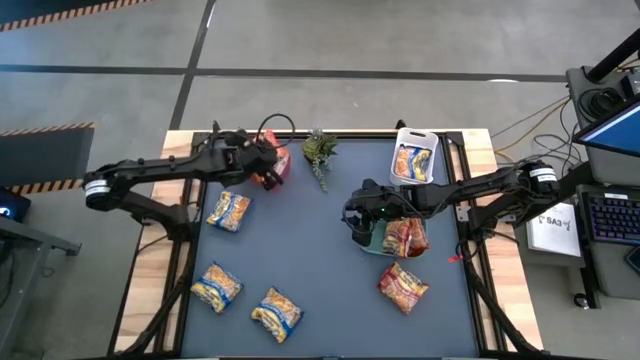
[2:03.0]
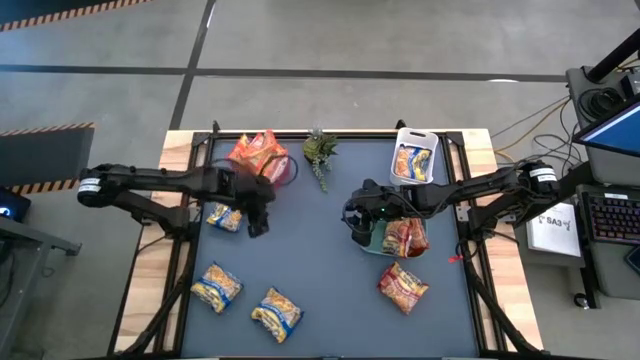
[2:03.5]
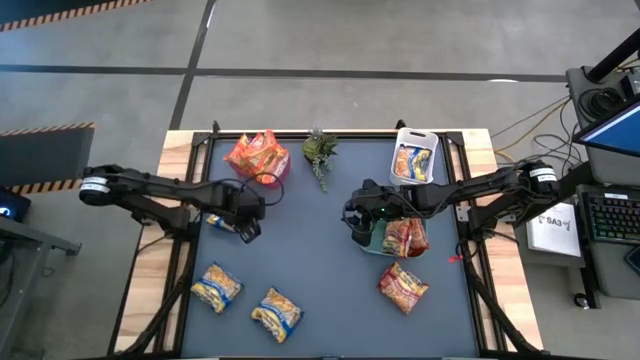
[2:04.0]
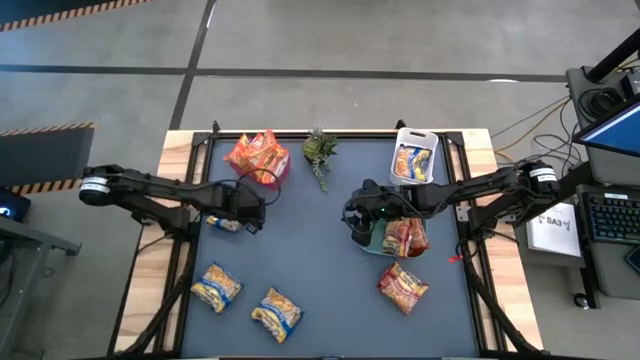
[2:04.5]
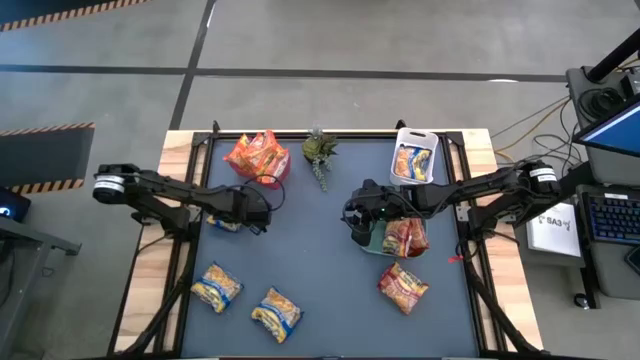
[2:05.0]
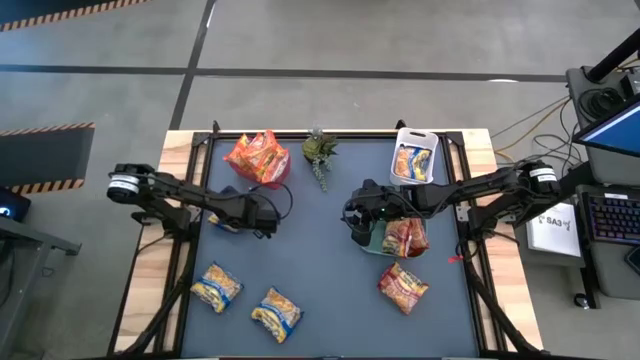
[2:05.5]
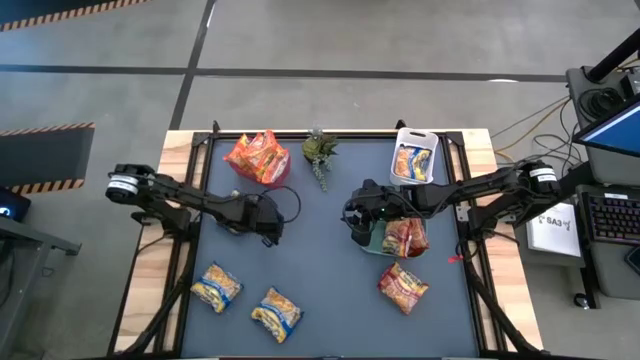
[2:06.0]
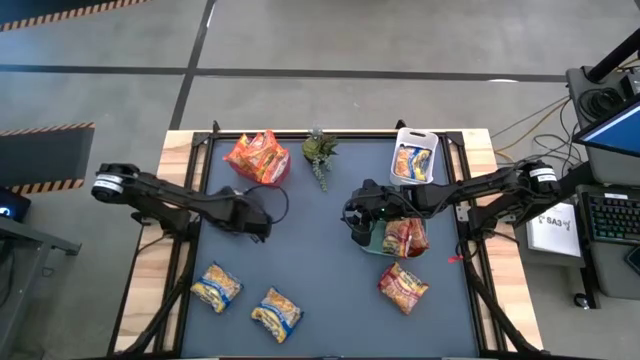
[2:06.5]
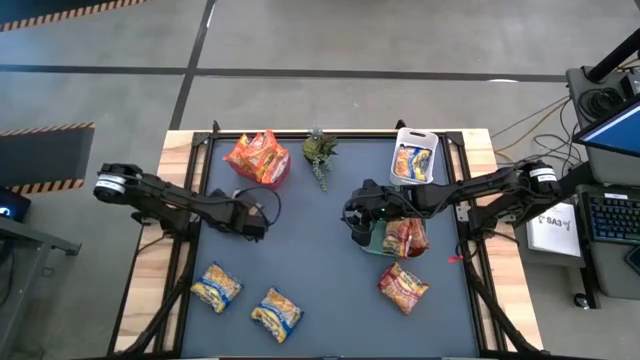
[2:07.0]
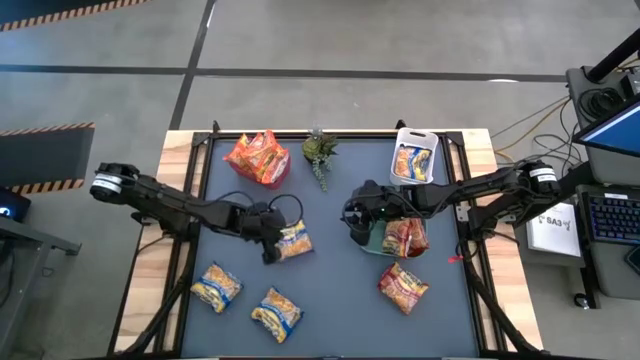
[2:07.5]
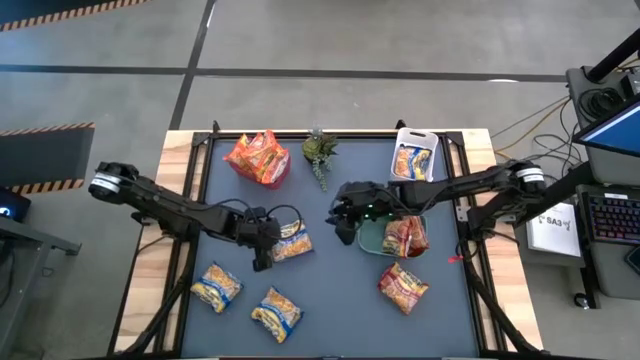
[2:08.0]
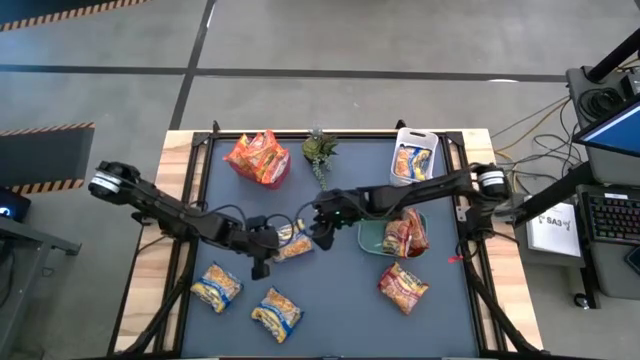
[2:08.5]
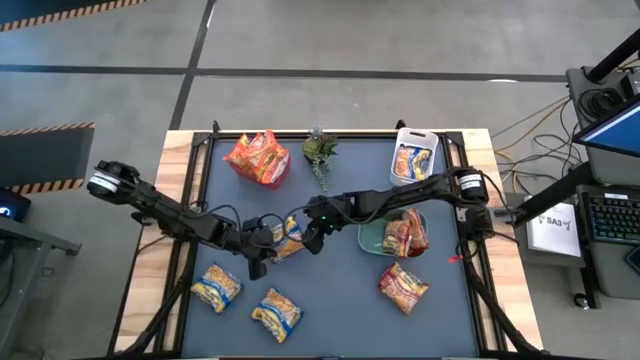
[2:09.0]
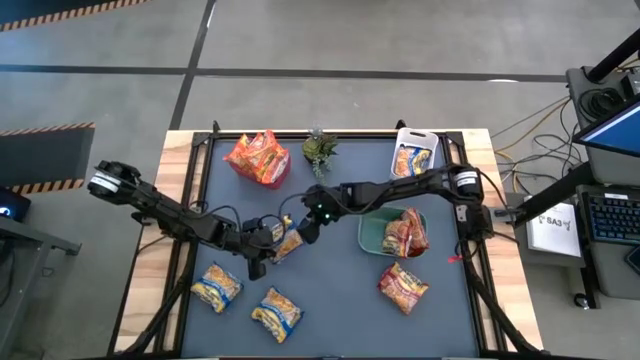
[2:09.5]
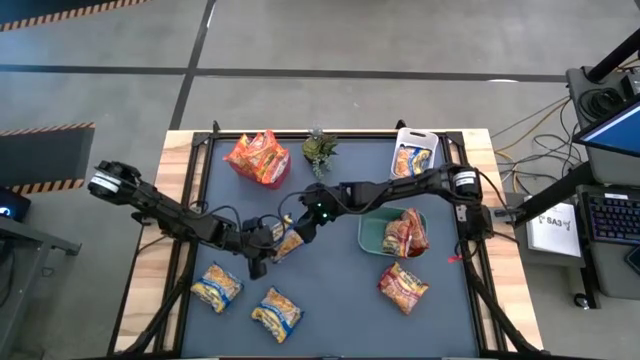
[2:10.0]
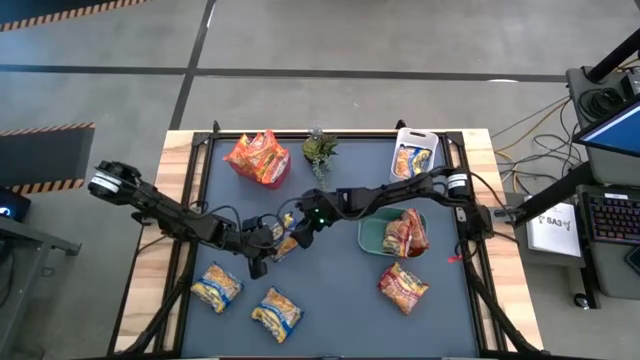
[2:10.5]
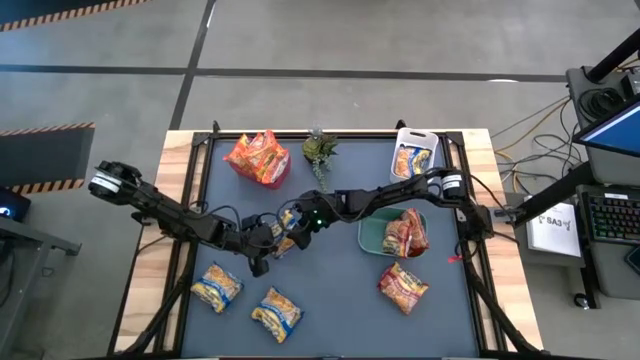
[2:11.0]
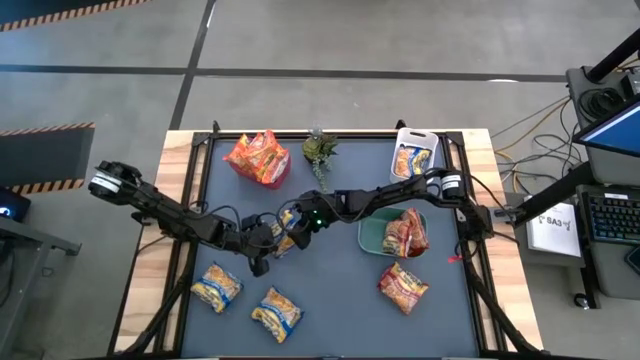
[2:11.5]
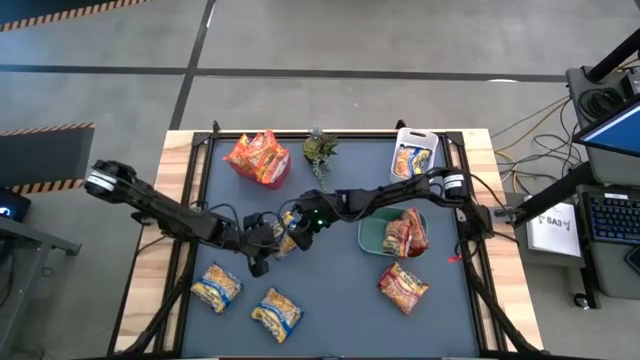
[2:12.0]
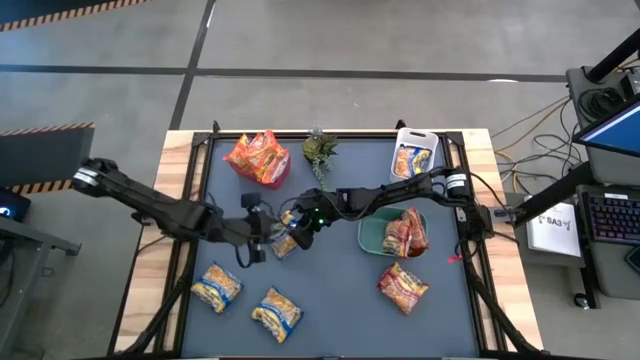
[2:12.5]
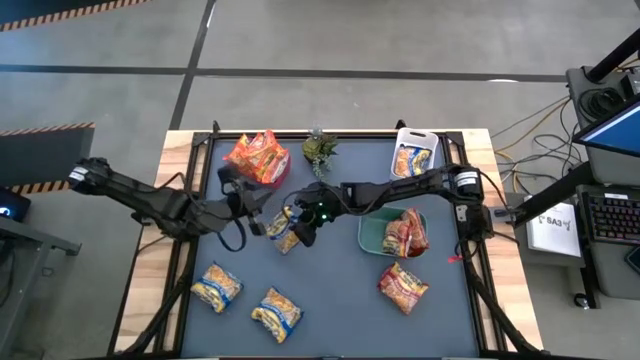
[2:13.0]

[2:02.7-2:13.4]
Task: Sort Maruchan noodles
Put the blue noodle pack into the white bin

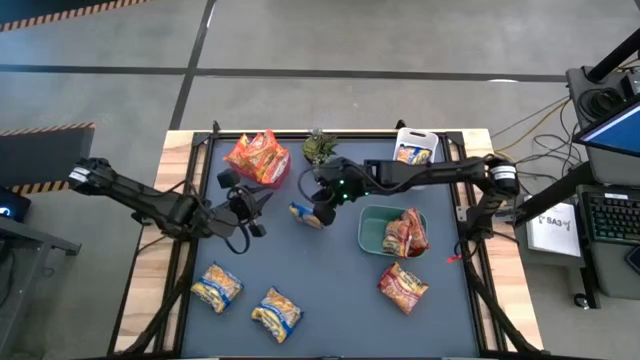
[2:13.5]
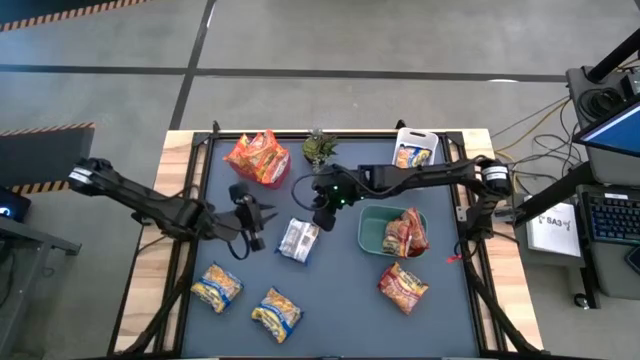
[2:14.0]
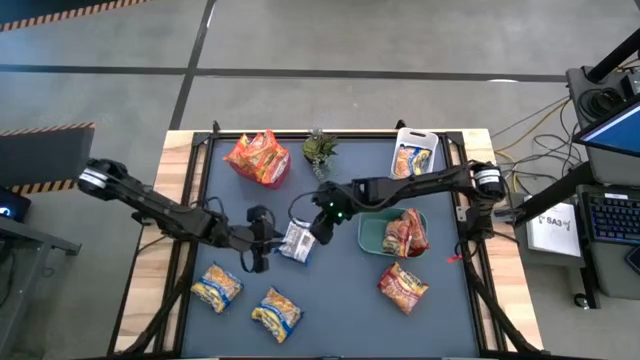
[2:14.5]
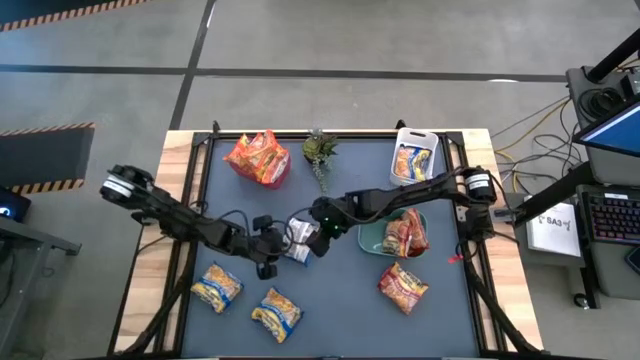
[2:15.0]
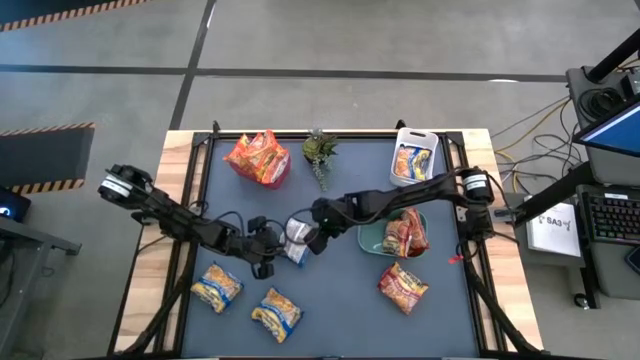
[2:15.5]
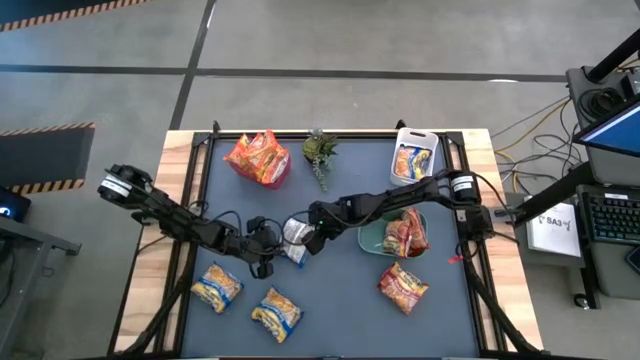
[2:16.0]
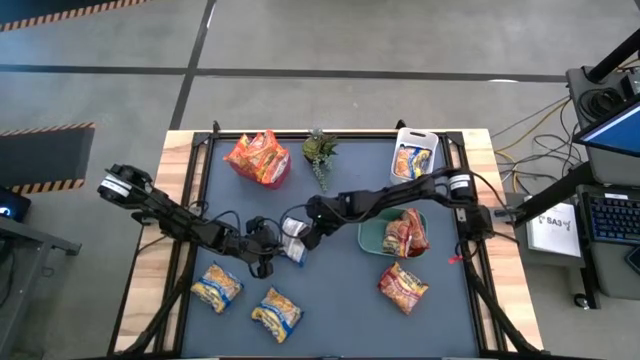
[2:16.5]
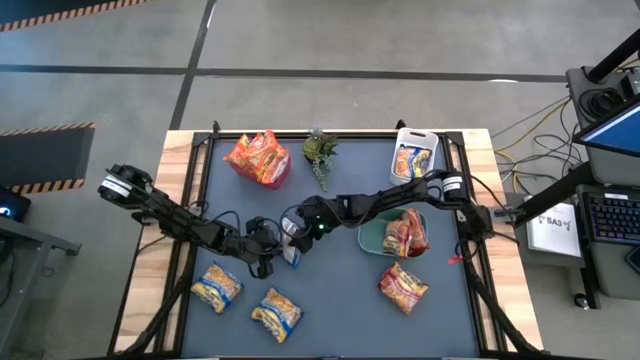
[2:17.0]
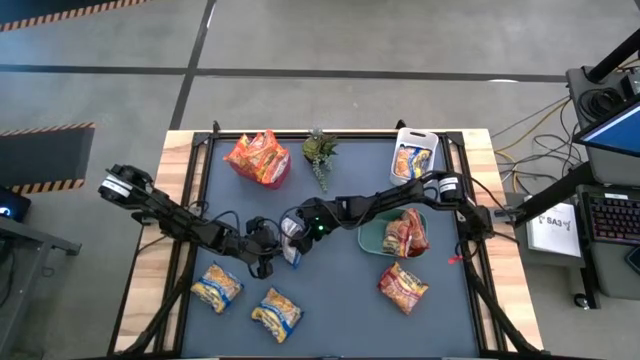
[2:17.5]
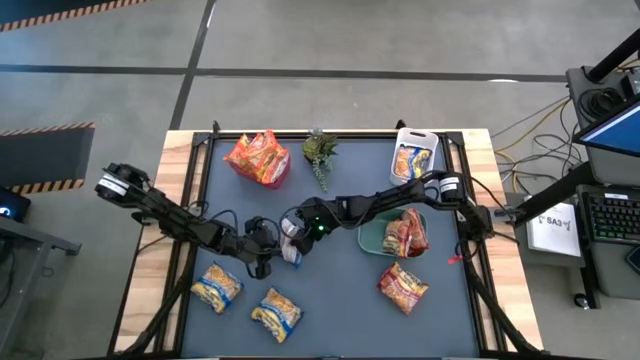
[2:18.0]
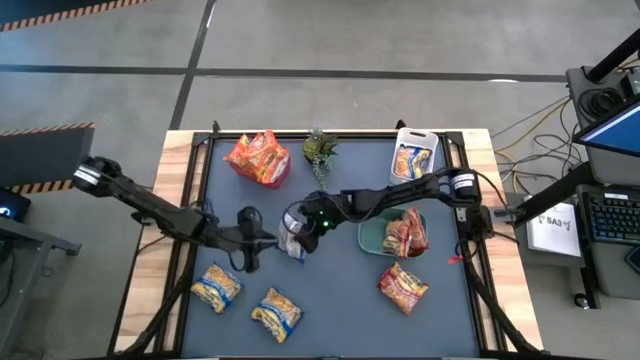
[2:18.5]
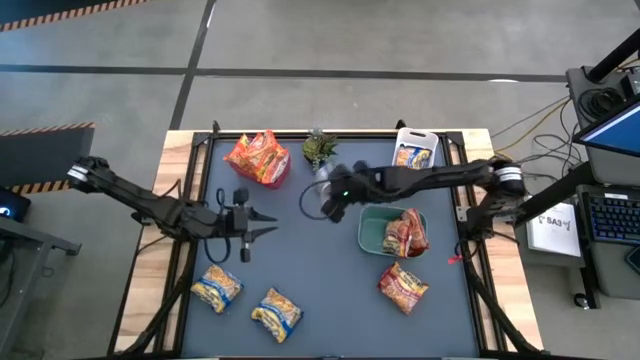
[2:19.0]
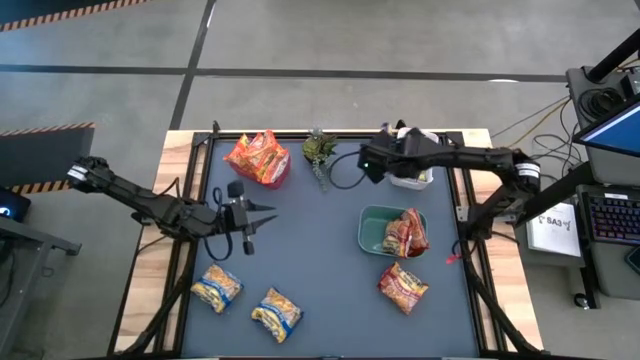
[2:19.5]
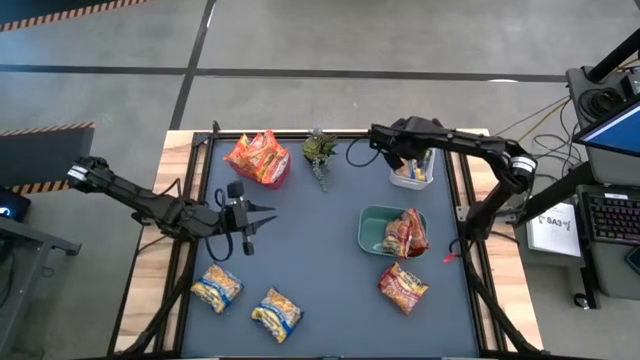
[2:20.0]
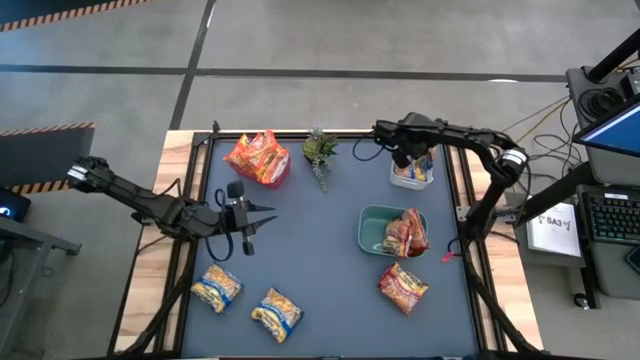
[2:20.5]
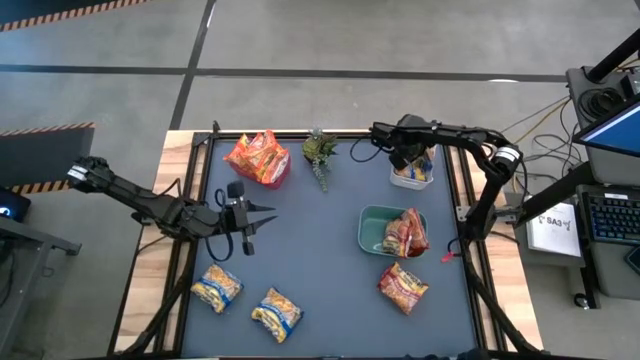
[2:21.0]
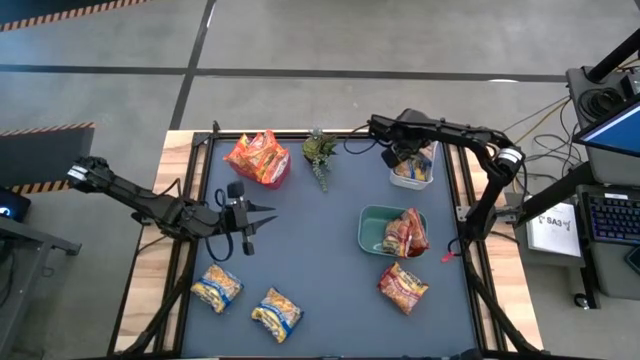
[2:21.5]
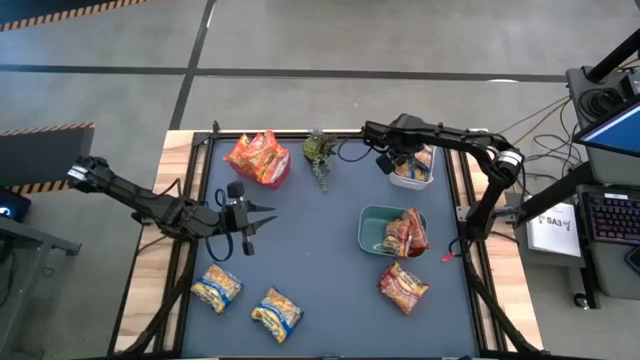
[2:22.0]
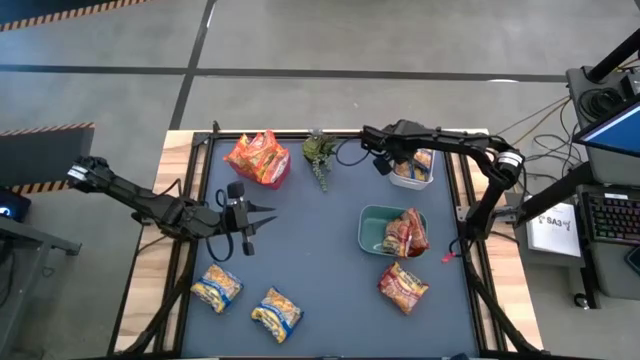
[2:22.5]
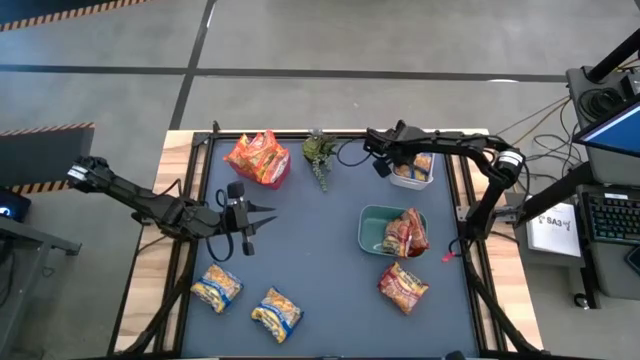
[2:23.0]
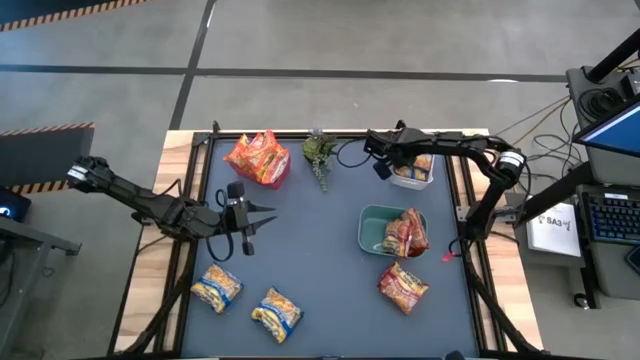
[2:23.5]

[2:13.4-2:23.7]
Put the blue noodle pack into the white bin
